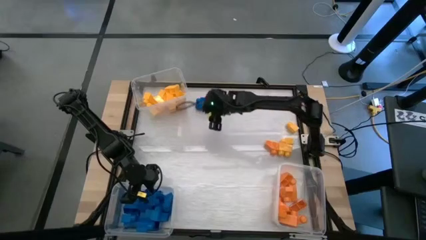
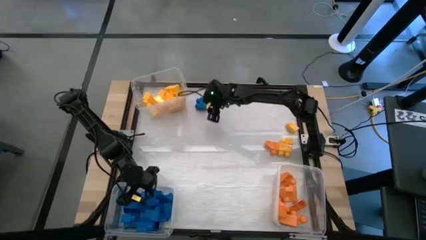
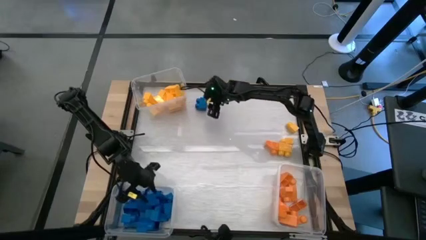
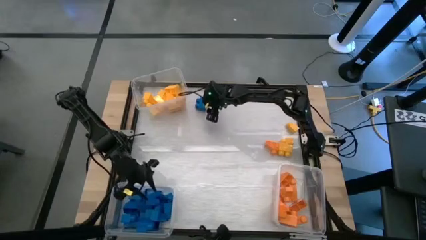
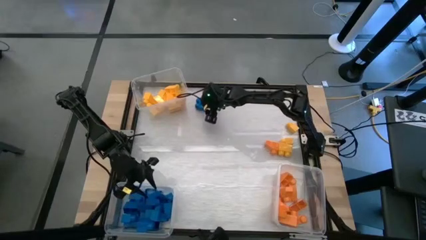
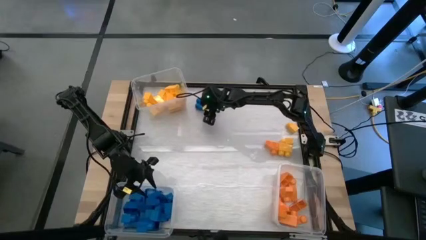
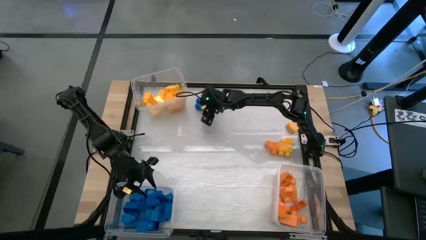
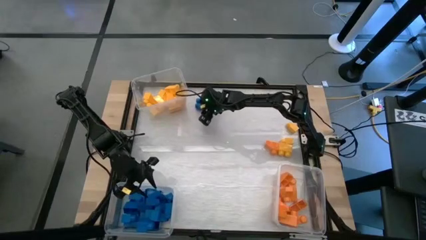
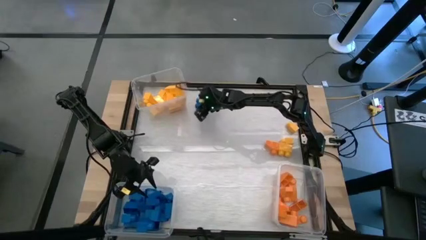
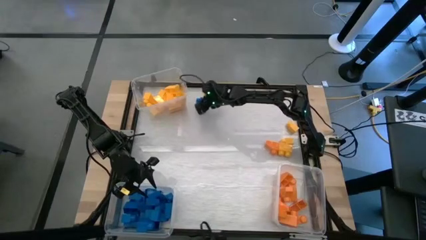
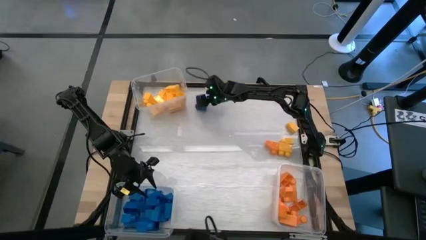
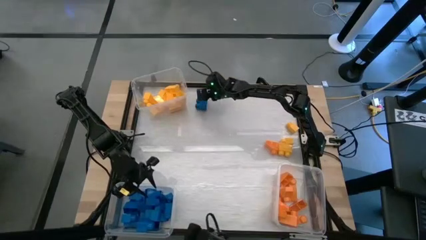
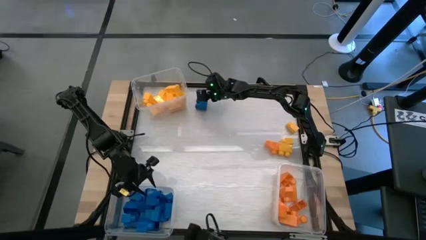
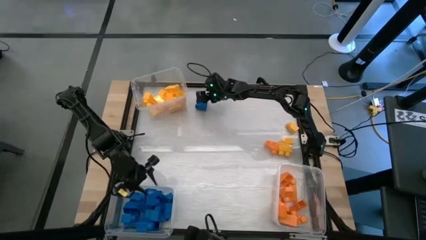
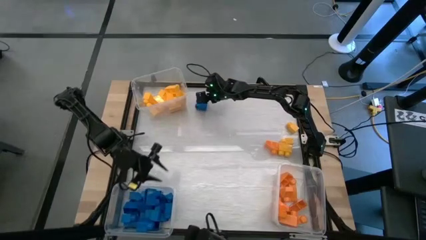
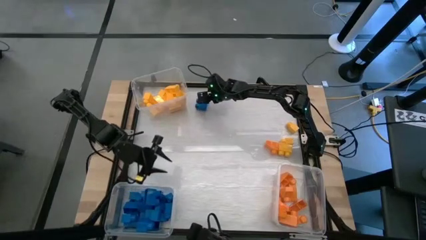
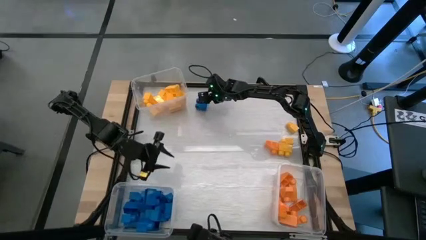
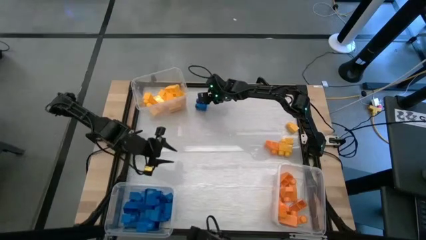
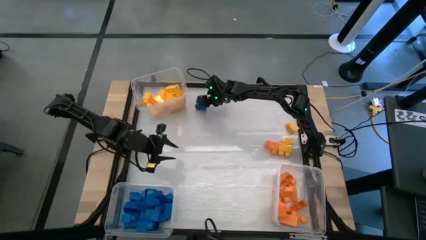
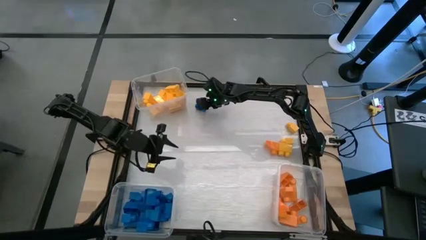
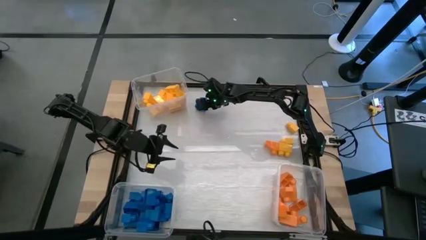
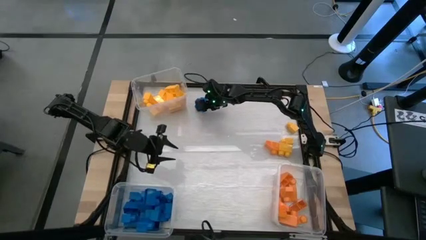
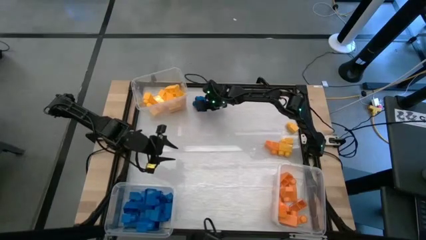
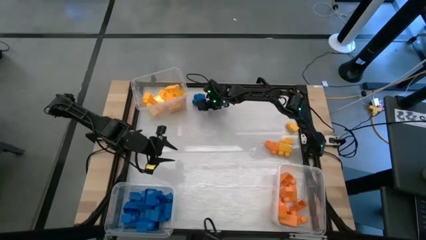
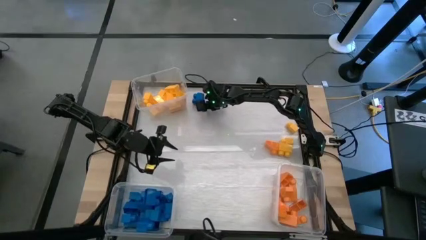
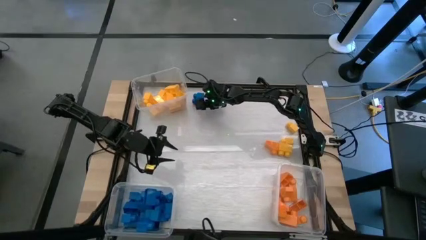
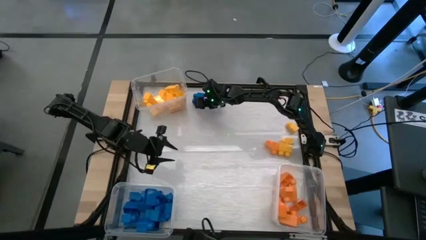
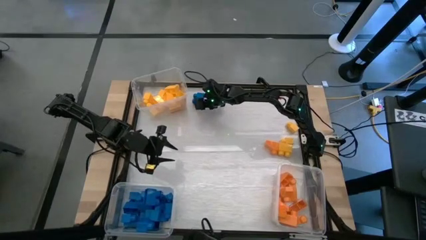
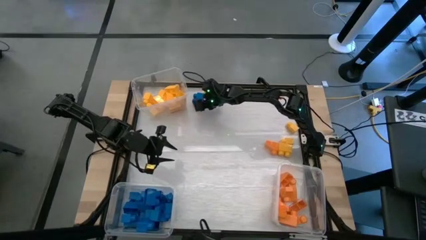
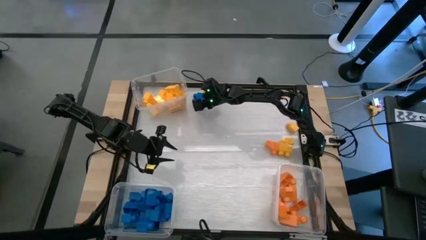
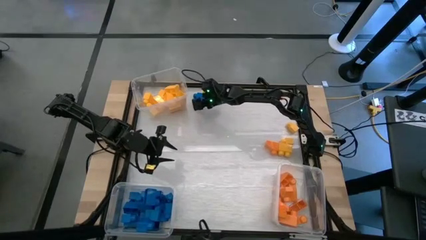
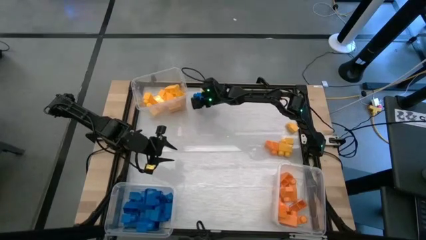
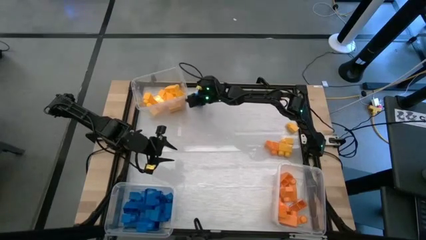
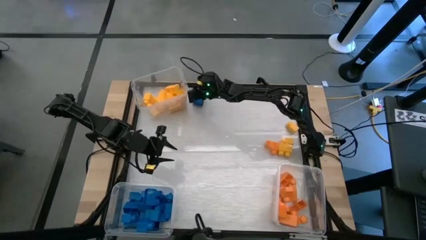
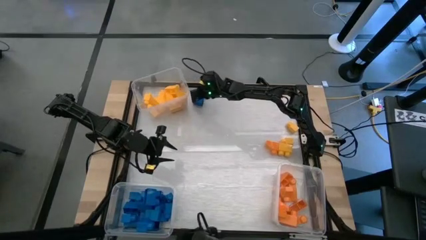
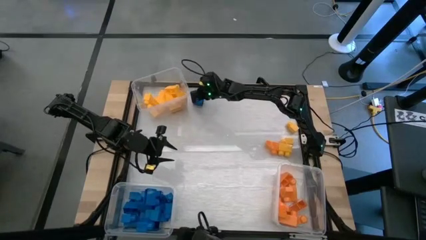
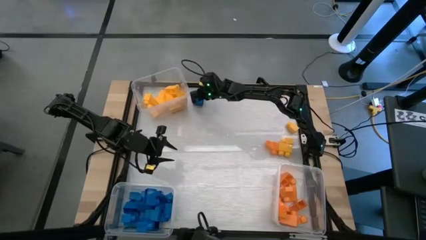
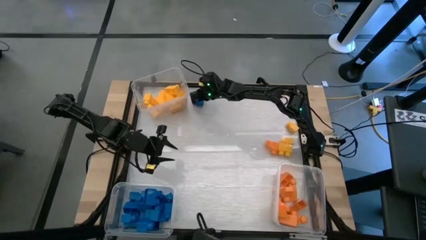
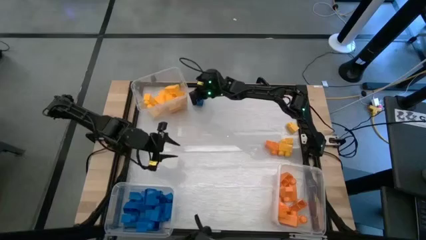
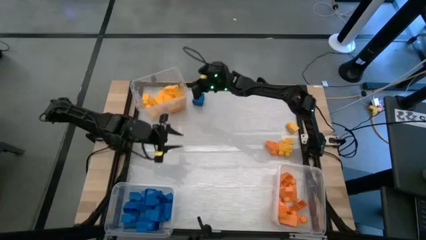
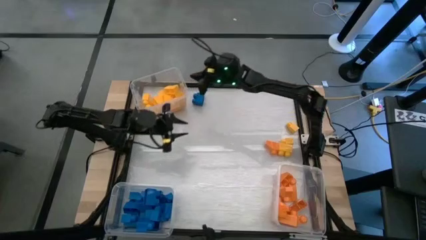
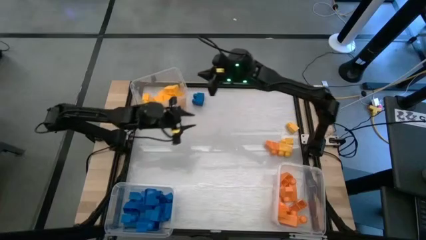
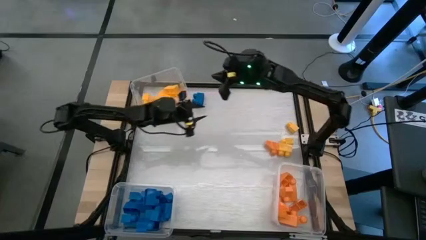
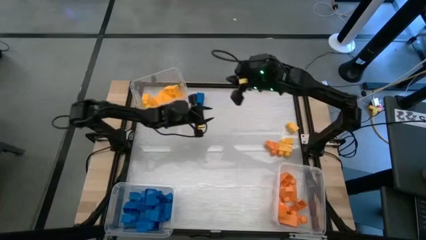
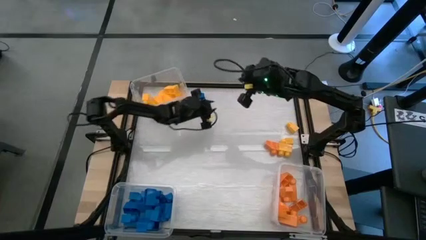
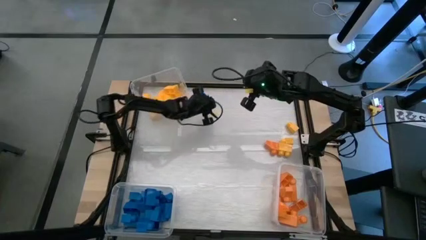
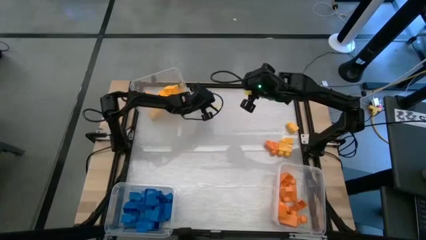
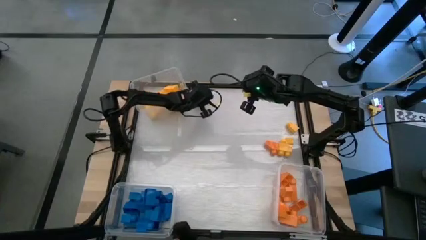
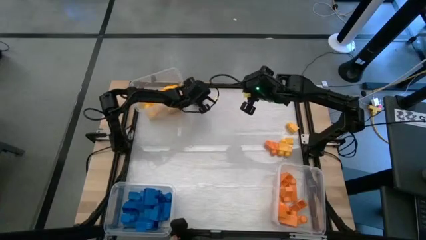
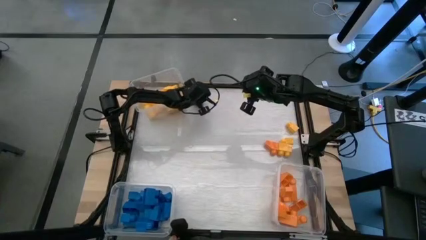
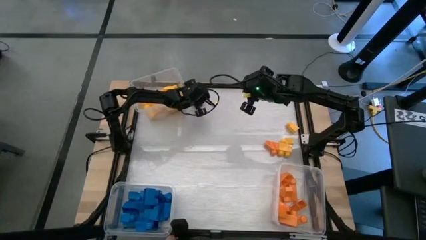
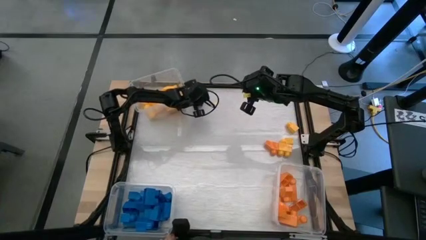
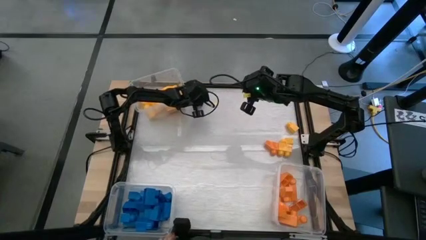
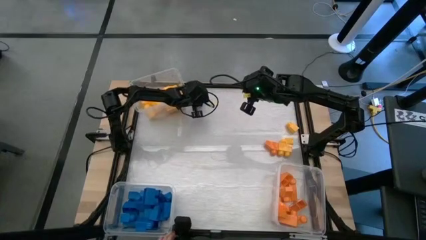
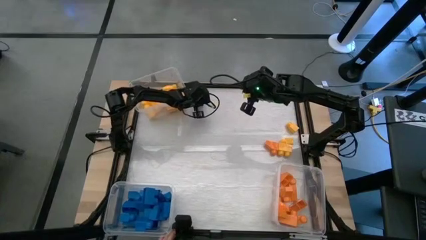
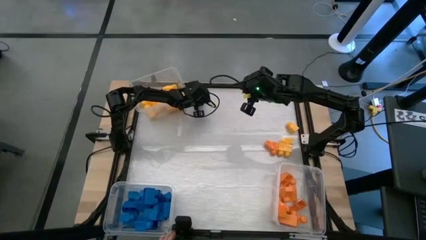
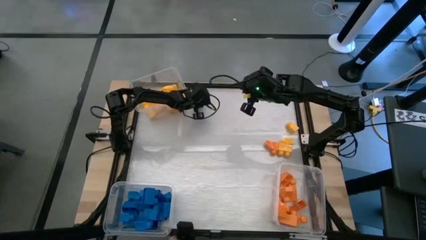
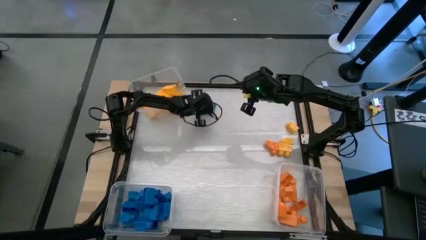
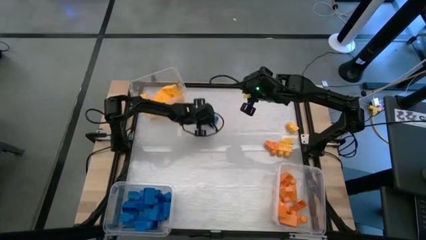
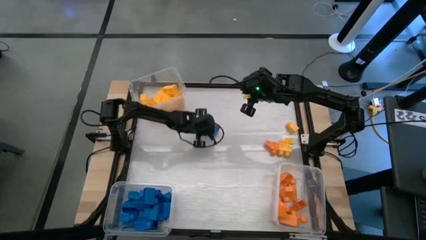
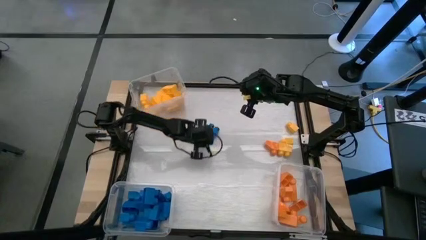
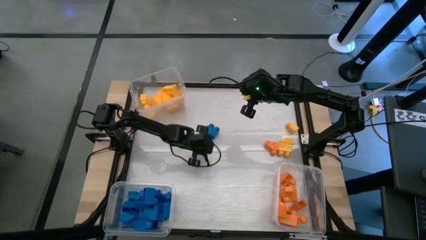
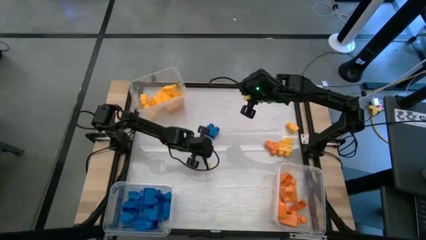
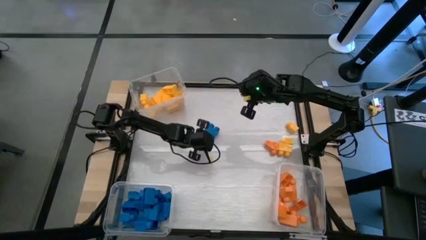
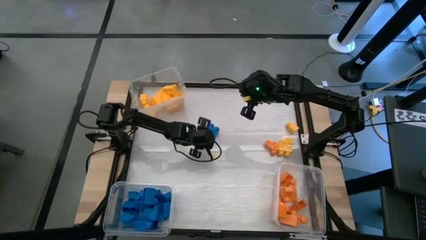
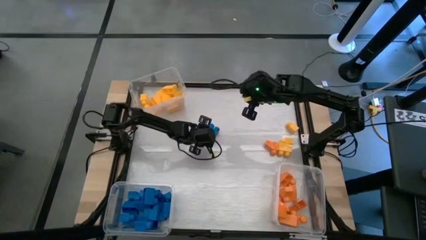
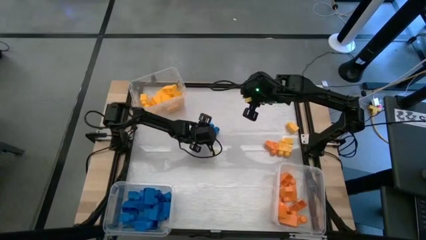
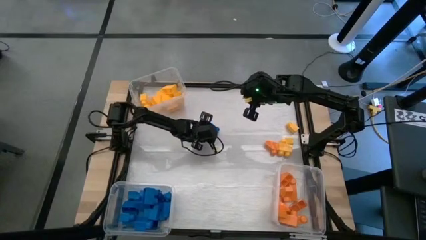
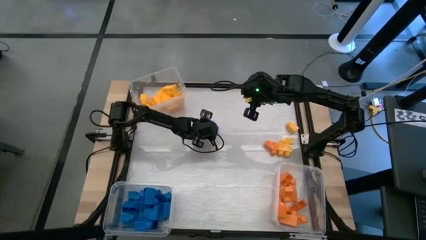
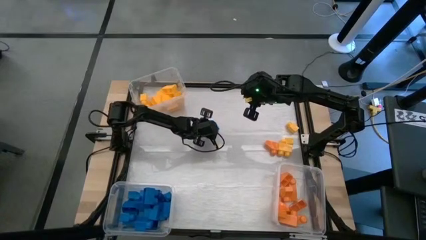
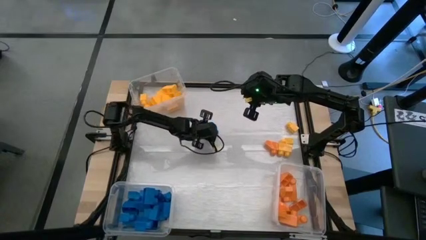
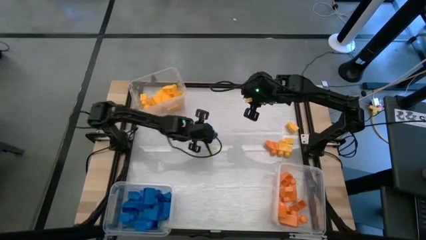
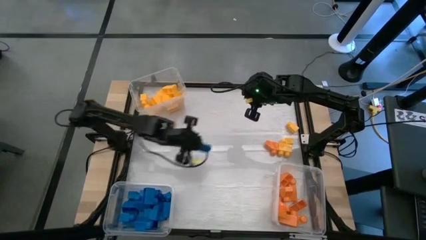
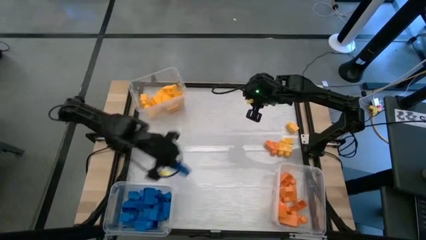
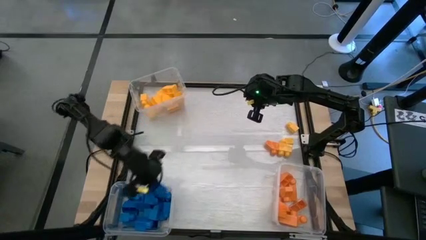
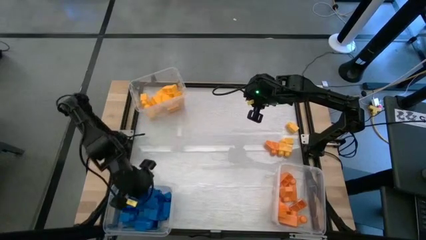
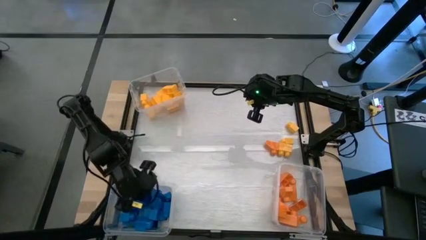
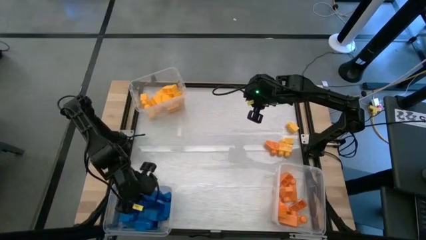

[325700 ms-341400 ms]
Task: Sort blocks
Put the blue game piece into the bottom left transparent bin
